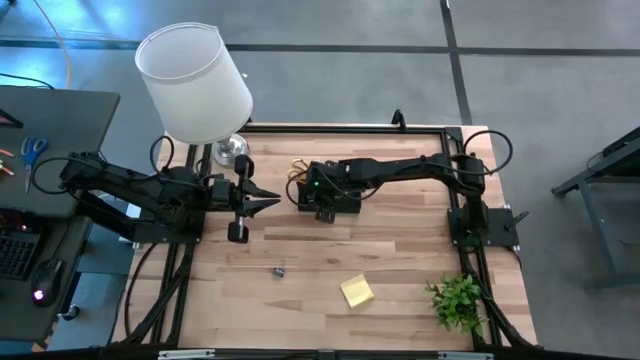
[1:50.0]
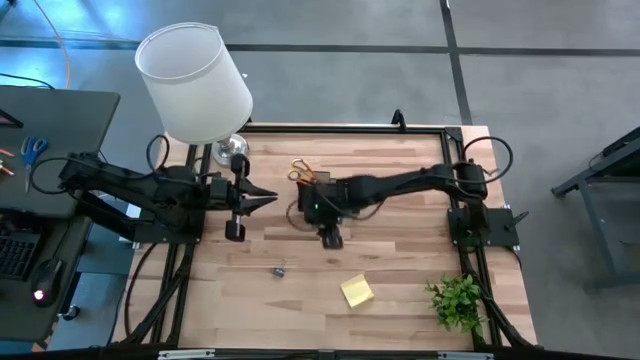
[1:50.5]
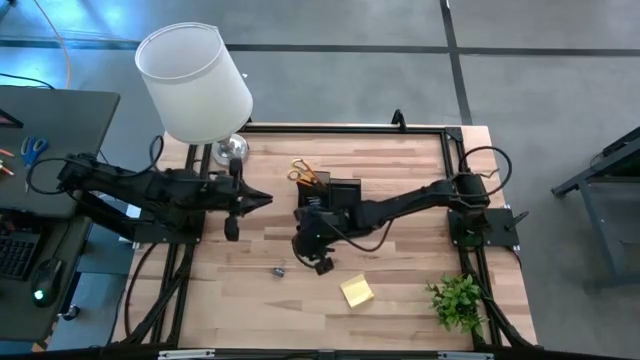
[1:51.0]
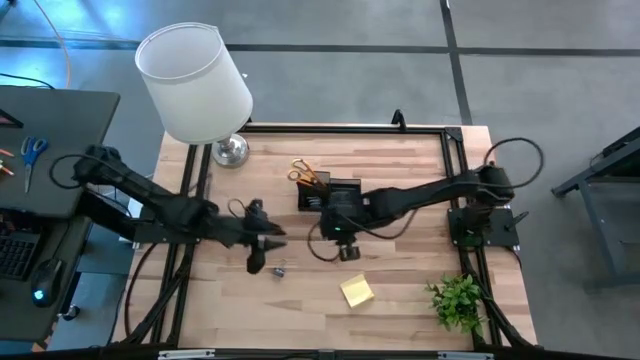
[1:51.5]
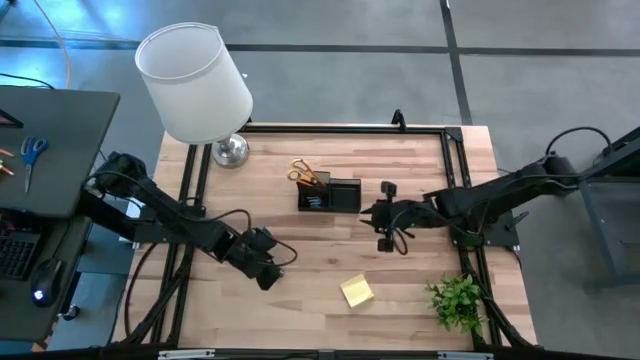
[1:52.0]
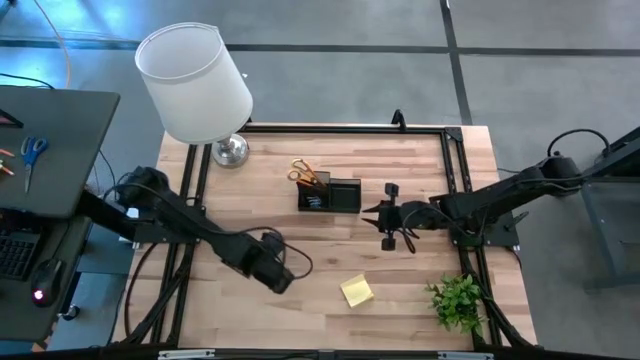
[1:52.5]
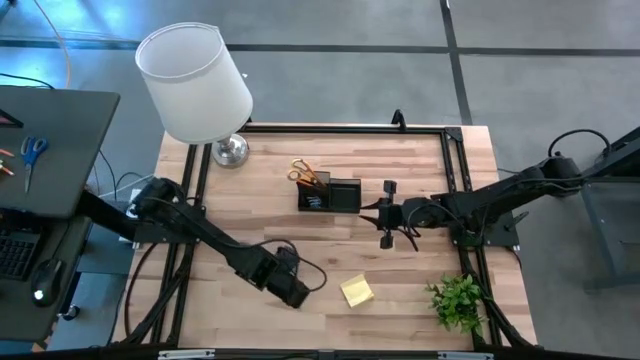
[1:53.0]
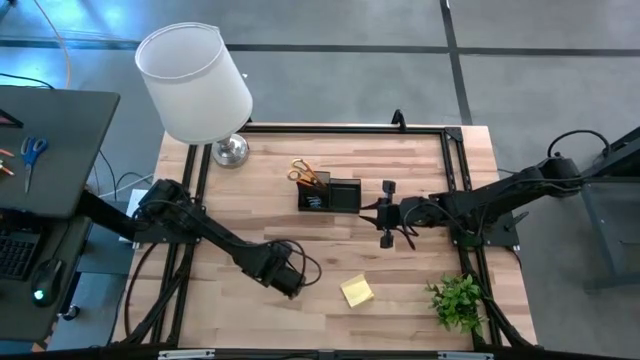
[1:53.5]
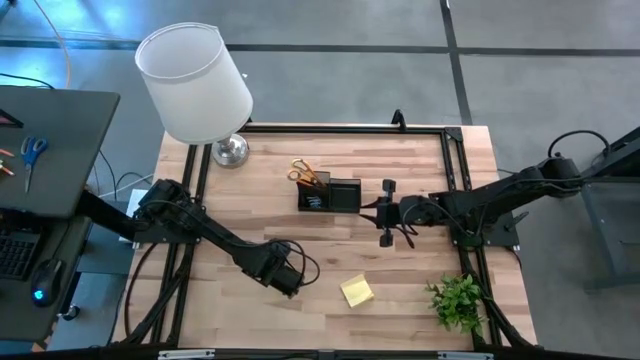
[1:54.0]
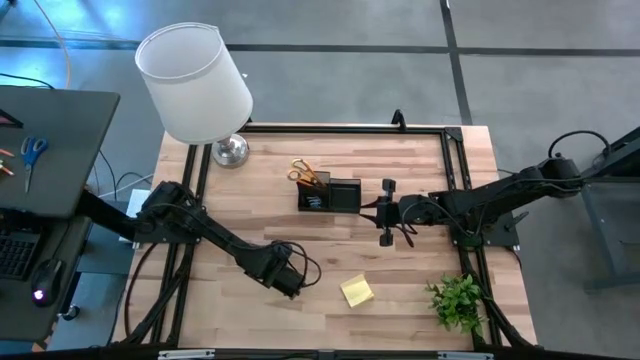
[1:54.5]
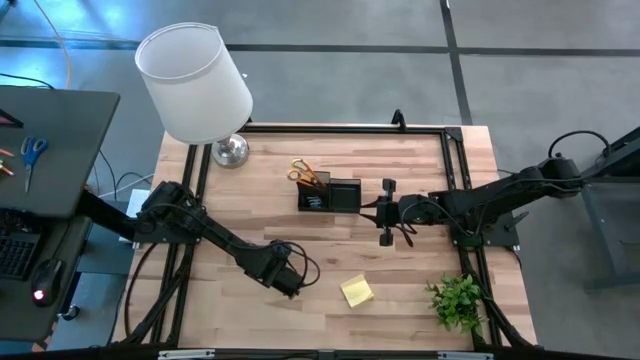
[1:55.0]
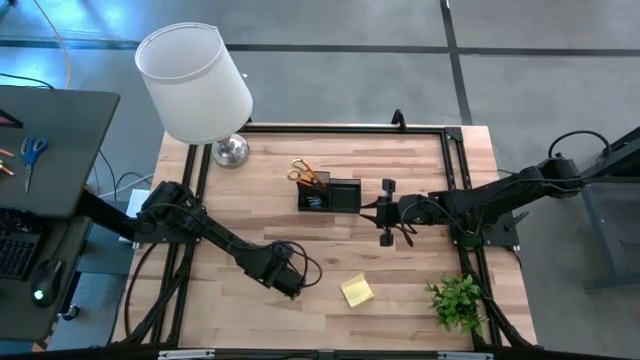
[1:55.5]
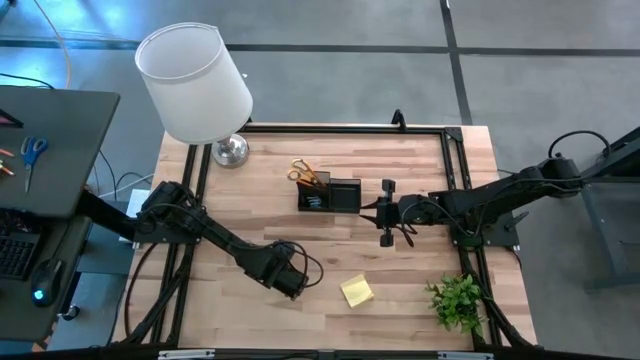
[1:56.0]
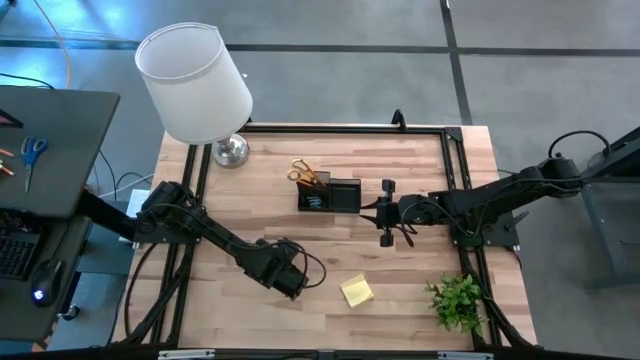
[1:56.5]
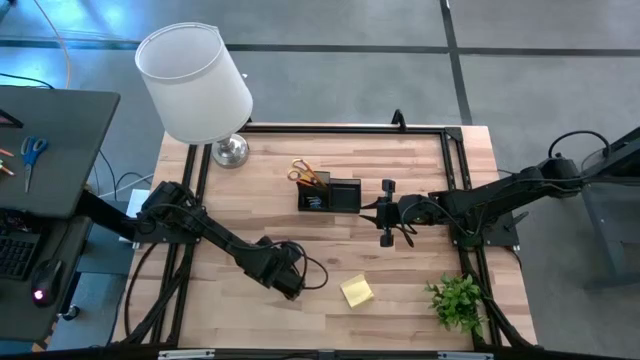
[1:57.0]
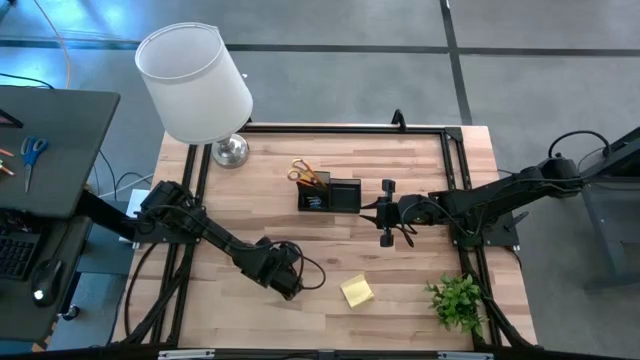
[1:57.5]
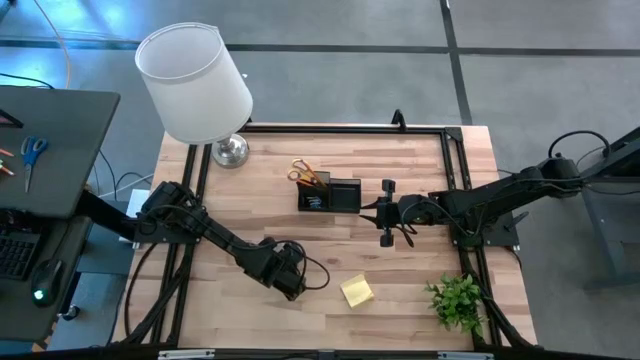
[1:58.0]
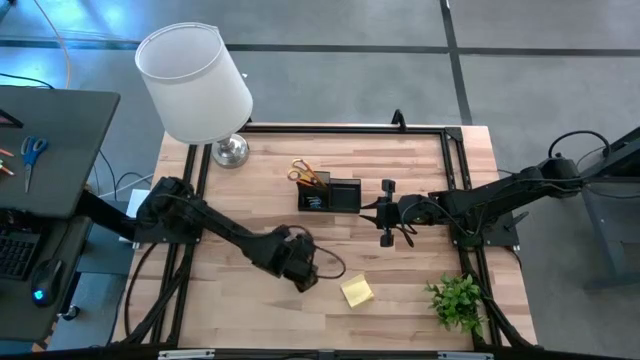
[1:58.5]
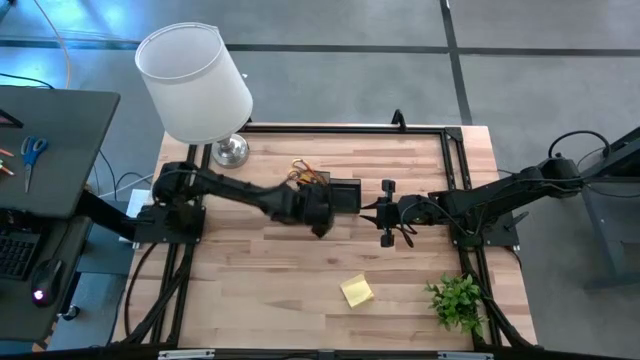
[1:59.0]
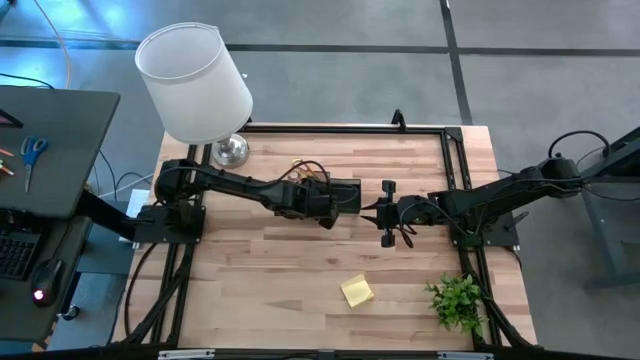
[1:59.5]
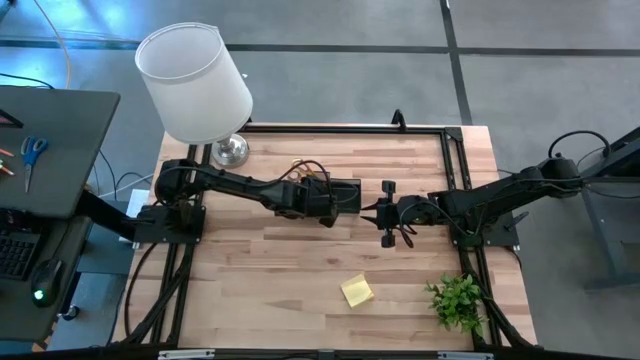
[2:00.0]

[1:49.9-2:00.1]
Task: Pick and place office supplies into organizer
Put the black binder clip into the black desk organizer

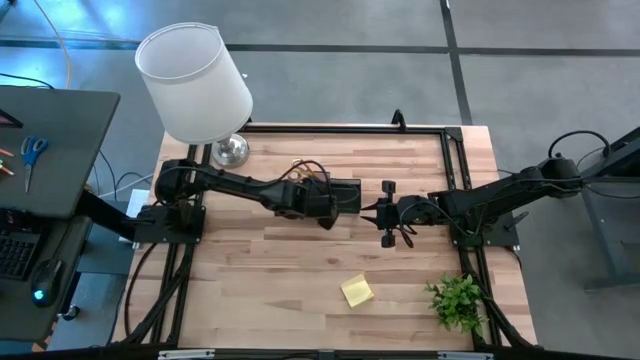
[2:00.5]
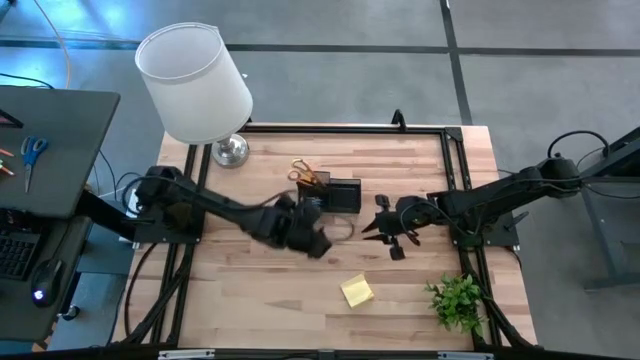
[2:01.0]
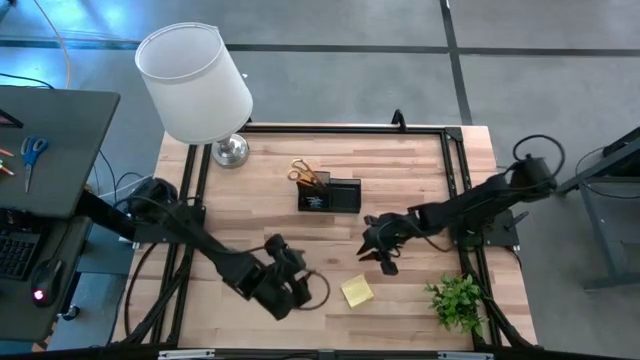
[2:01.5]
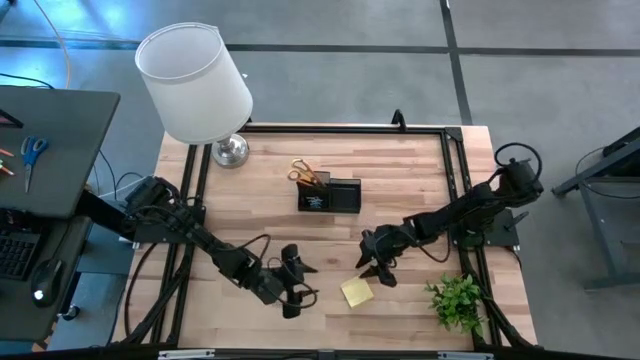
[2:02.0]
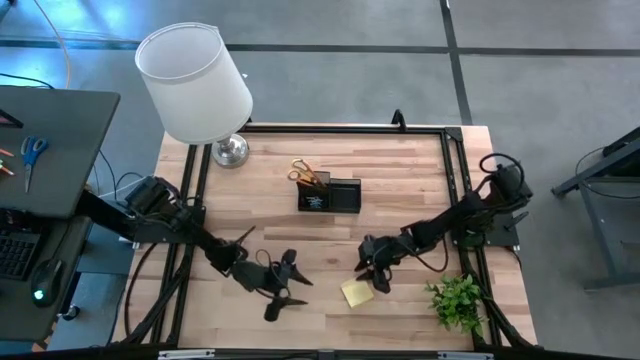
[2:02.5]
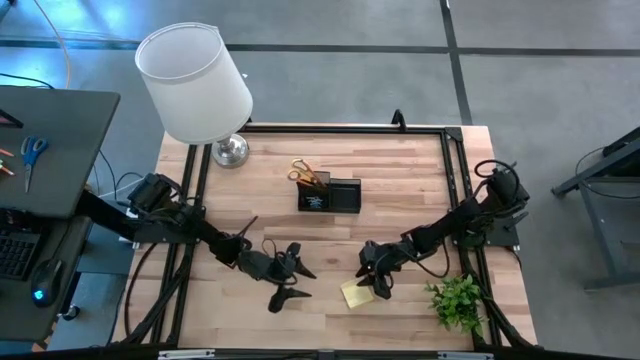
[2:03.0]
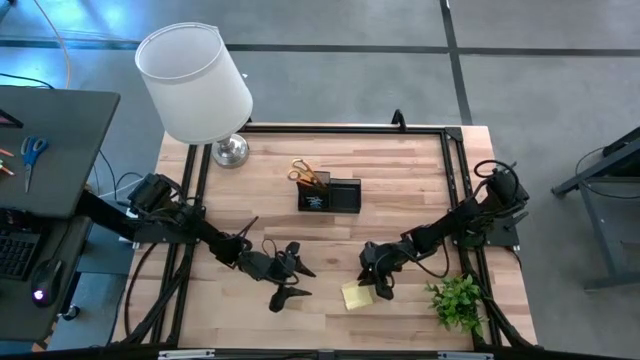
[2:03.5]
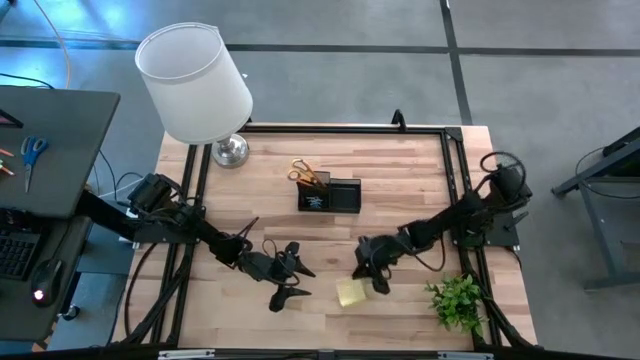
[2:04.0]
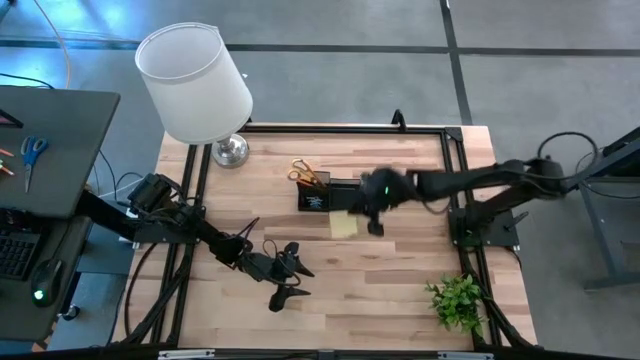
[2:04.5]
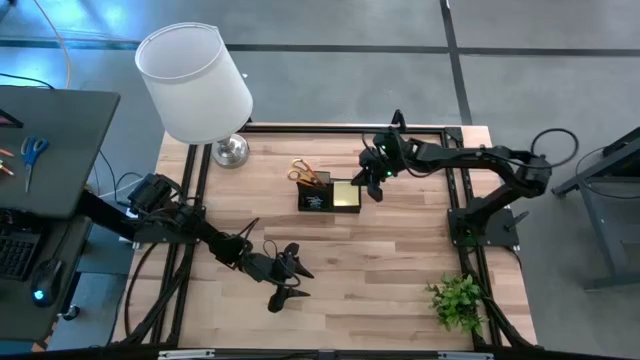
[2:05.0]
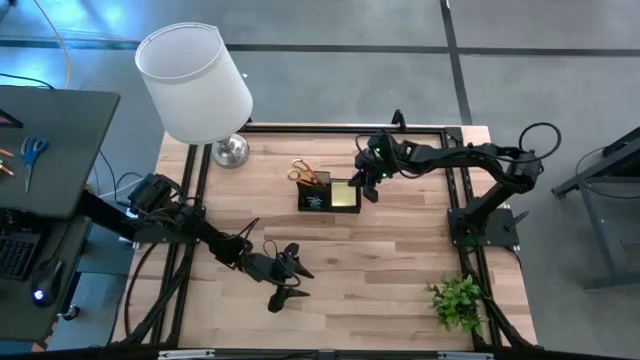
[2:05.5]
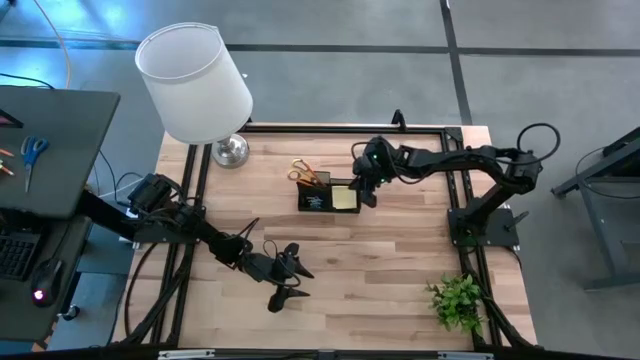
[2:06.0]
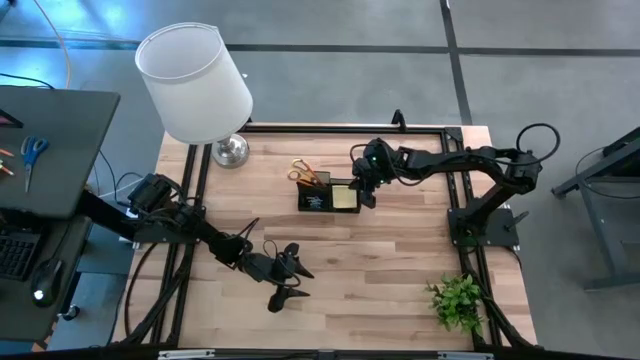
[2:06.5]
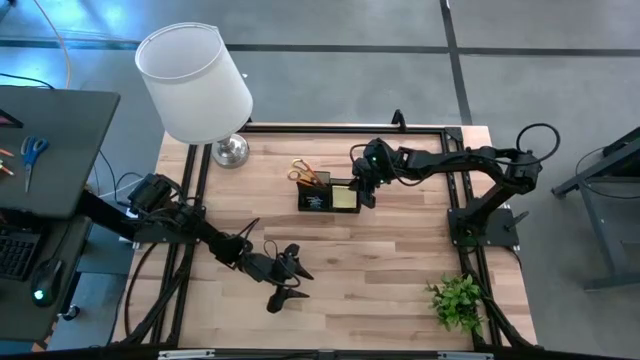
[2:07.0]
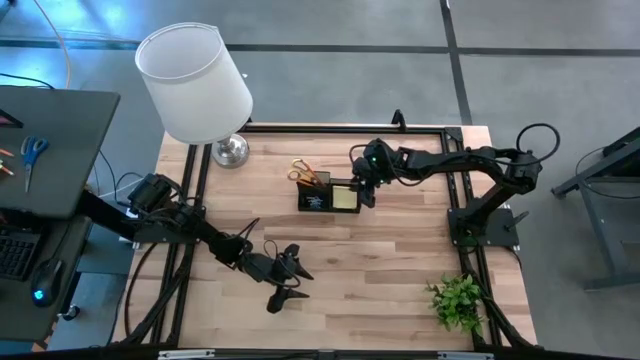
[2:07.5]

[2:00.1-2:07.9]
Put the yellow sticky notes into the black desk organizer

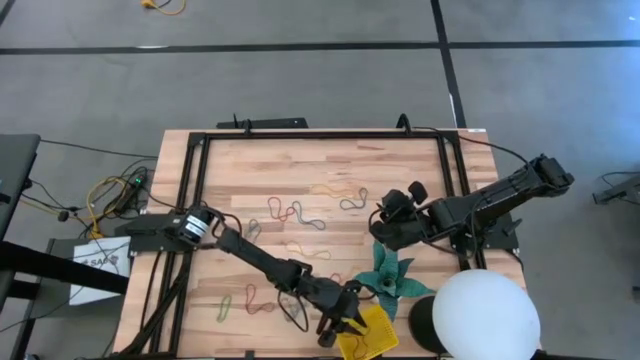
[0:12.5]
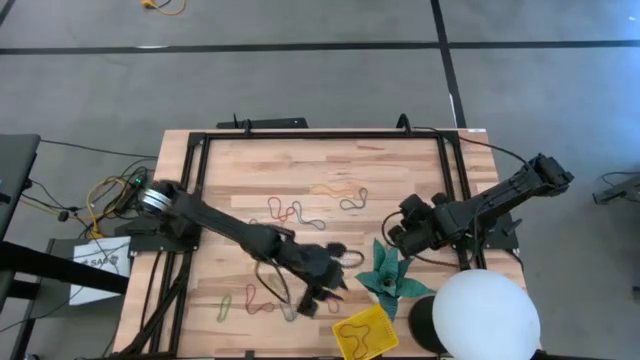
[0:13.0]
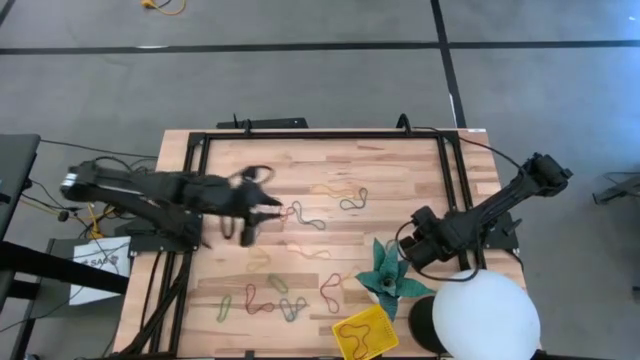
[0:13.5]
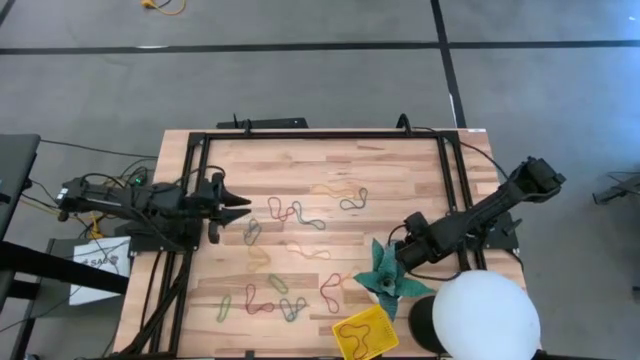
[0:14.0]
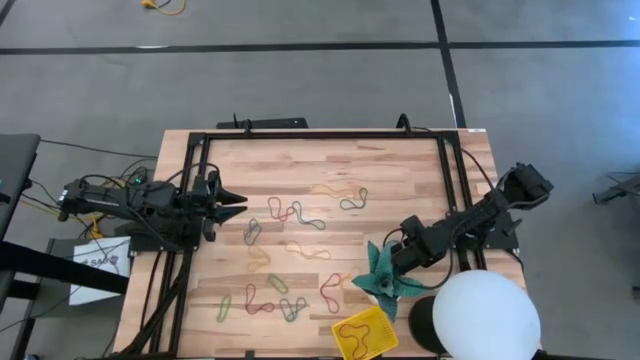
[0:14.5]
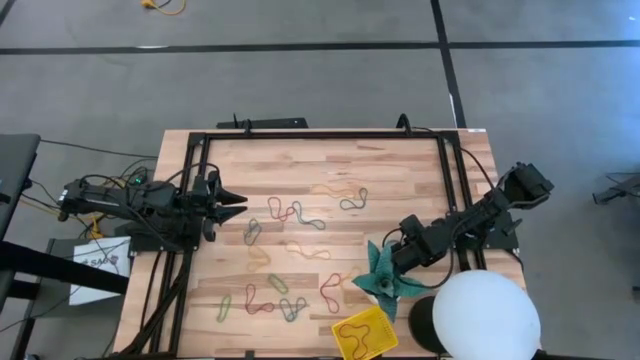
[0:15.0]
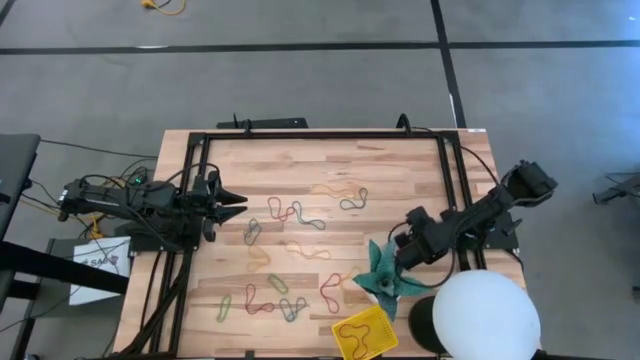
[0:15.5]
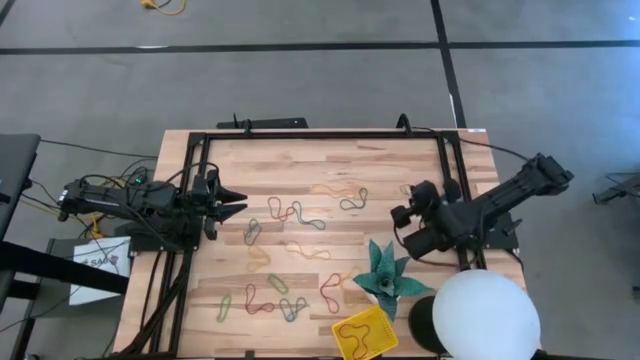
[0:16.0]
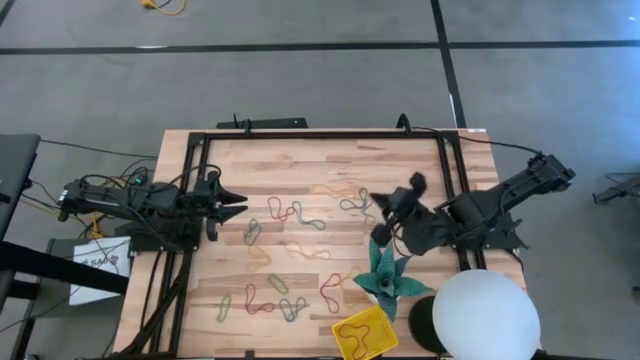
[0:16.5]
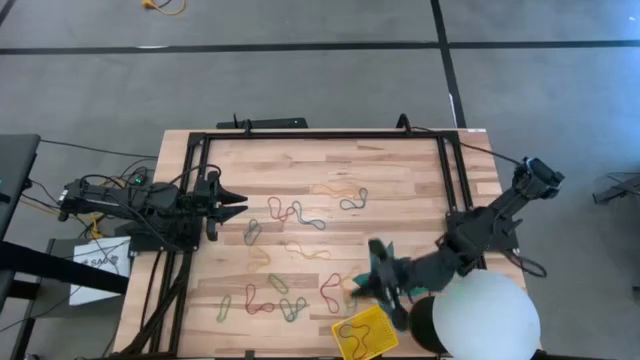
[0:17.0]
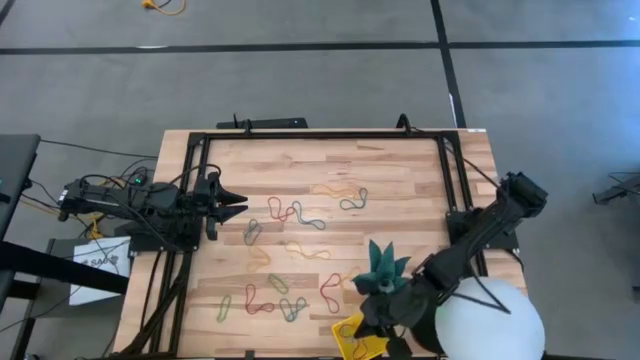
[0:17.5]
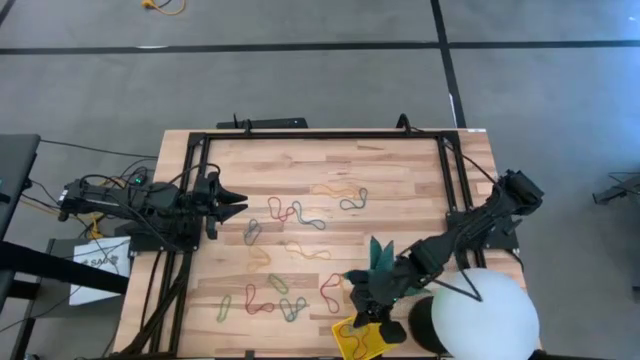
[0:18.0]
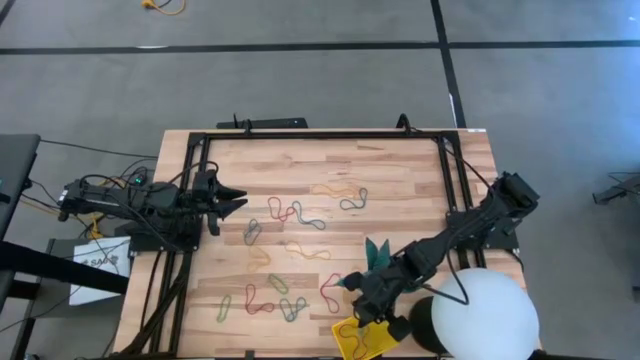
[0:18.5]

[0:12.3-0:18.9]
Task: Pick and place items into bin
Put the blue rubber band into the yellow bin
